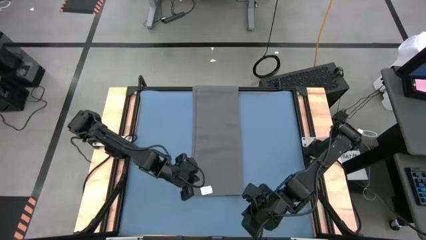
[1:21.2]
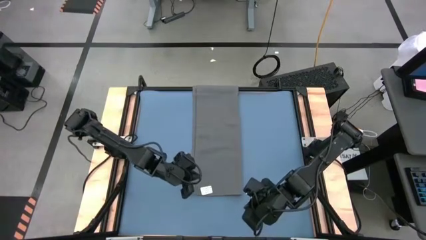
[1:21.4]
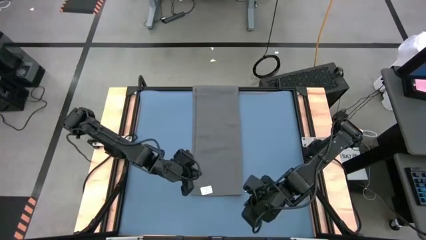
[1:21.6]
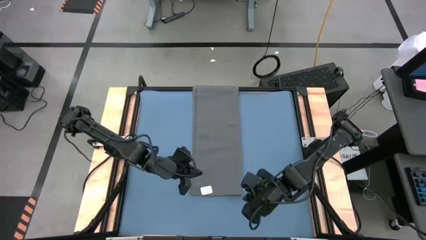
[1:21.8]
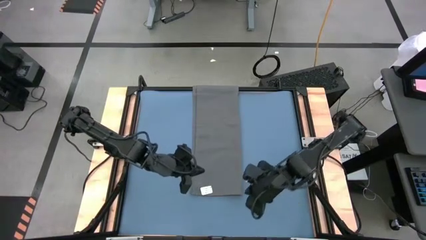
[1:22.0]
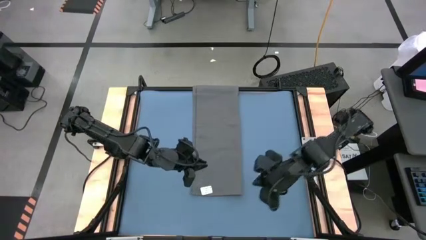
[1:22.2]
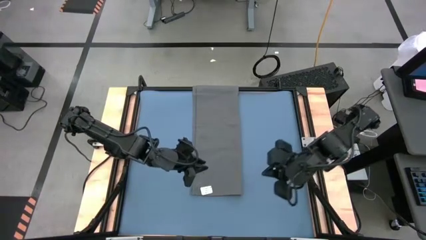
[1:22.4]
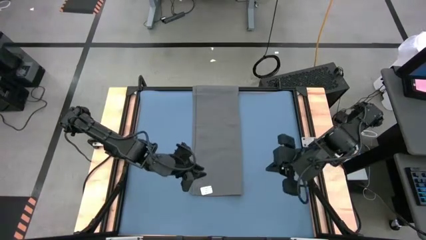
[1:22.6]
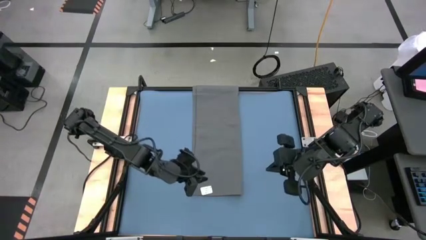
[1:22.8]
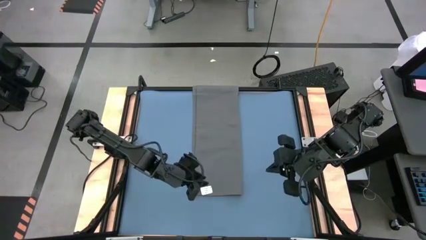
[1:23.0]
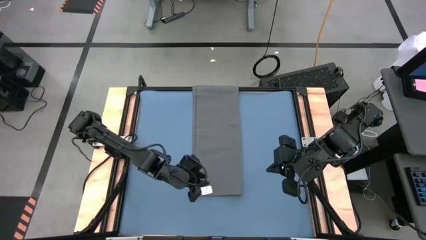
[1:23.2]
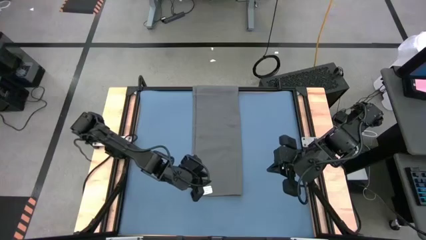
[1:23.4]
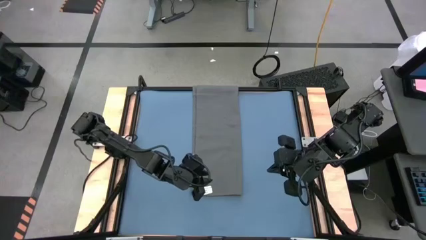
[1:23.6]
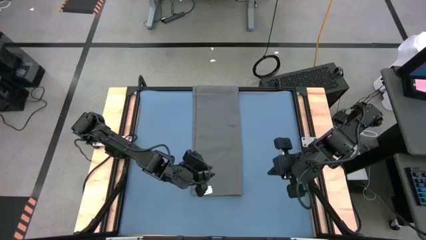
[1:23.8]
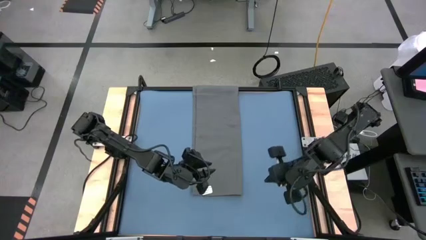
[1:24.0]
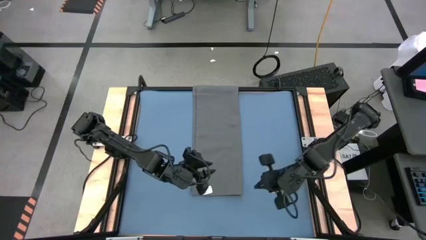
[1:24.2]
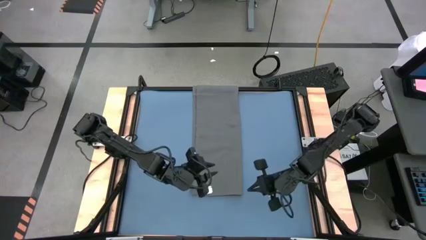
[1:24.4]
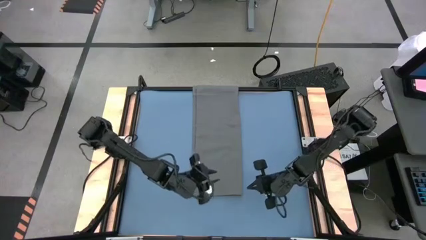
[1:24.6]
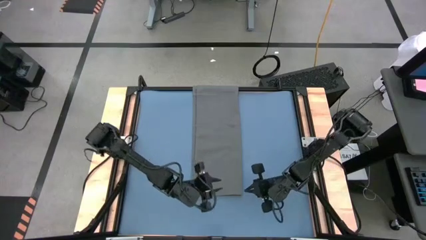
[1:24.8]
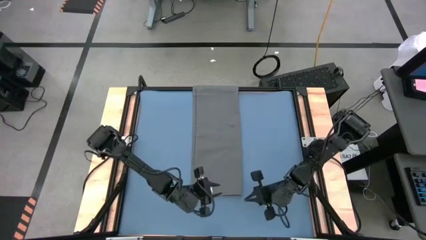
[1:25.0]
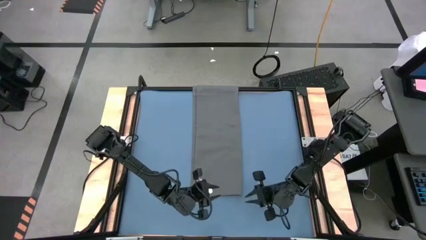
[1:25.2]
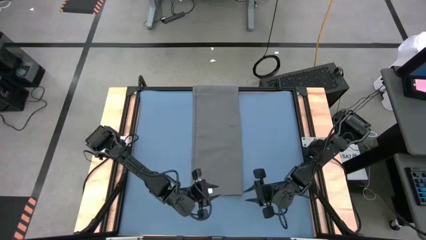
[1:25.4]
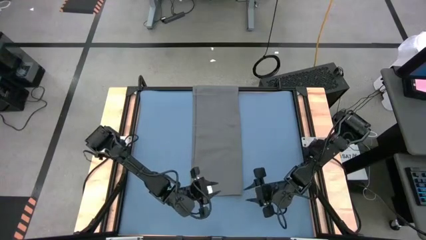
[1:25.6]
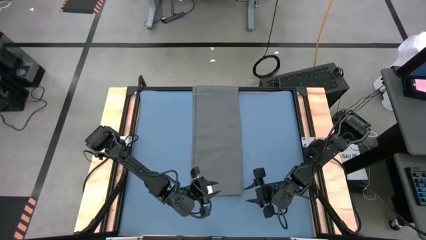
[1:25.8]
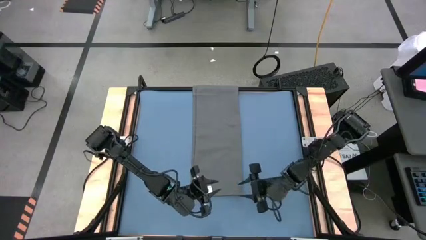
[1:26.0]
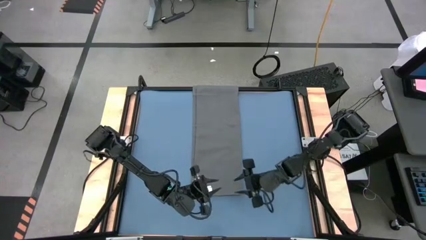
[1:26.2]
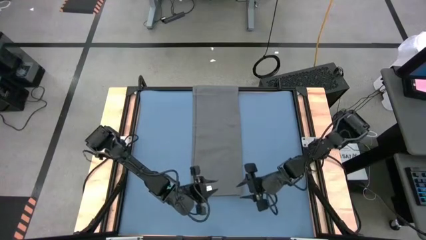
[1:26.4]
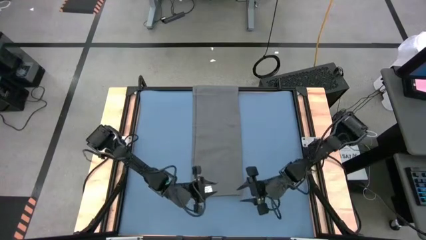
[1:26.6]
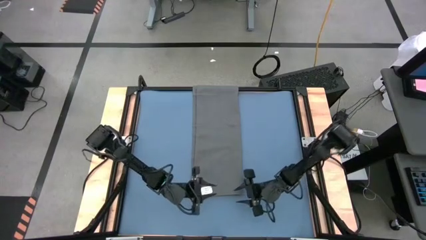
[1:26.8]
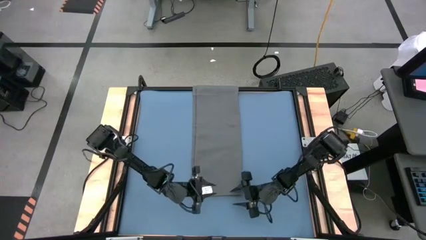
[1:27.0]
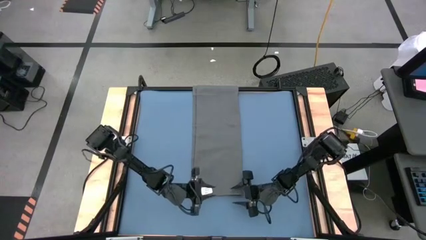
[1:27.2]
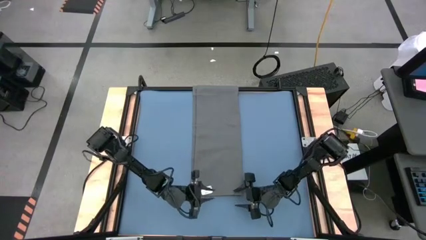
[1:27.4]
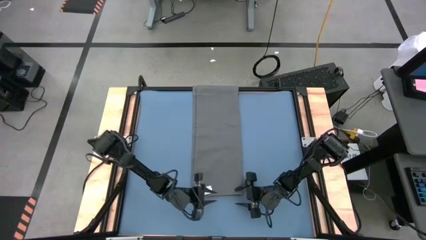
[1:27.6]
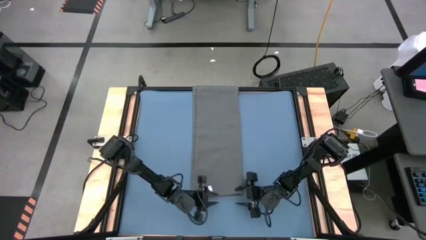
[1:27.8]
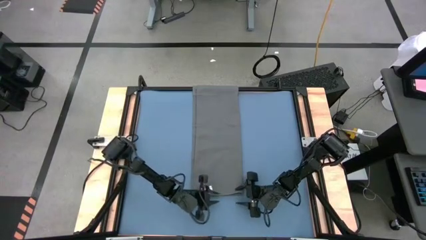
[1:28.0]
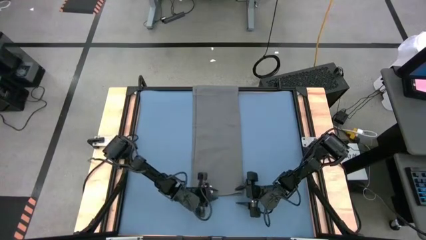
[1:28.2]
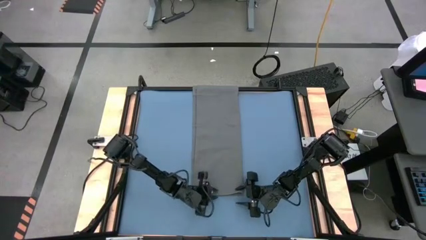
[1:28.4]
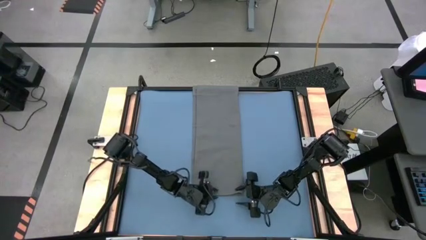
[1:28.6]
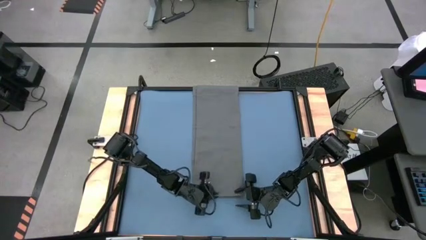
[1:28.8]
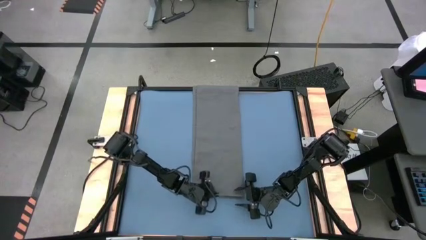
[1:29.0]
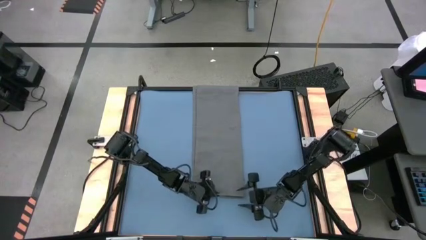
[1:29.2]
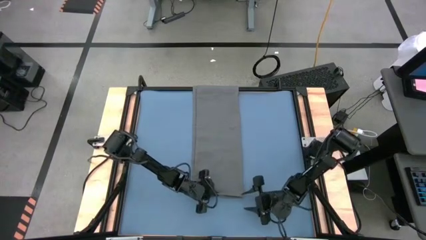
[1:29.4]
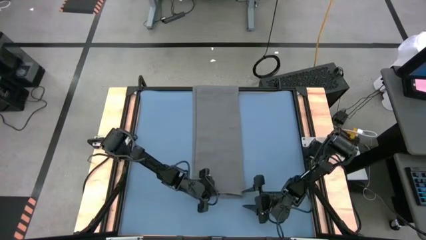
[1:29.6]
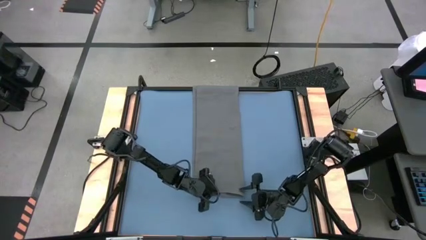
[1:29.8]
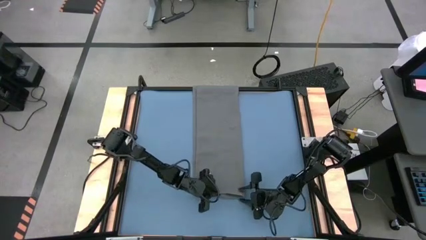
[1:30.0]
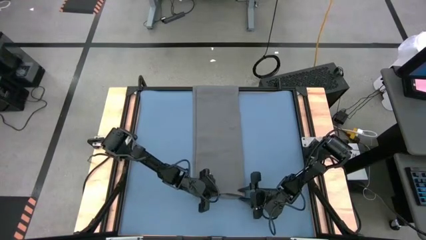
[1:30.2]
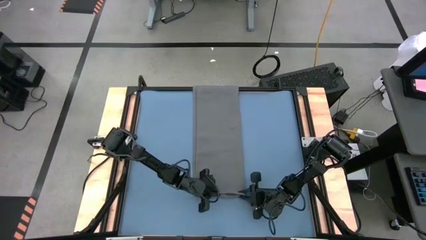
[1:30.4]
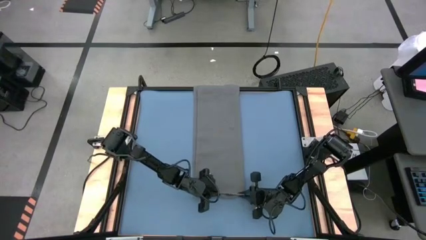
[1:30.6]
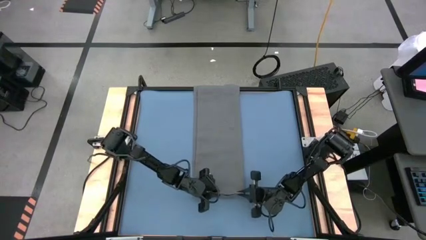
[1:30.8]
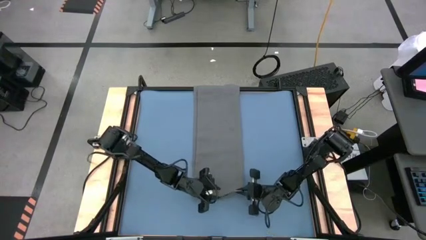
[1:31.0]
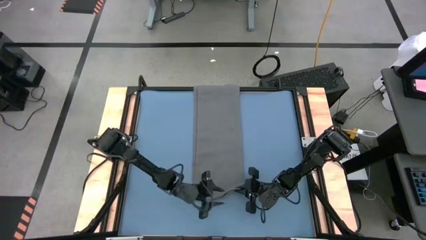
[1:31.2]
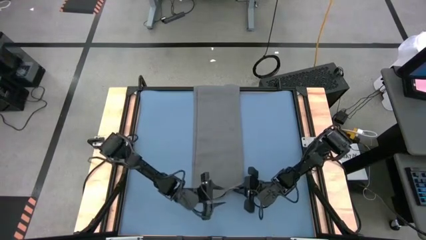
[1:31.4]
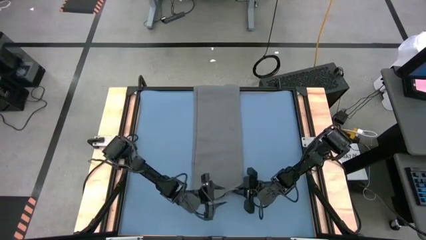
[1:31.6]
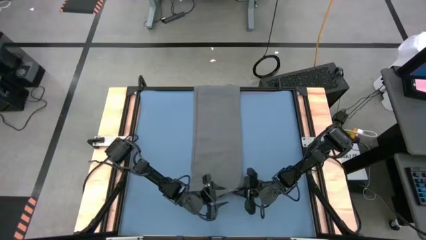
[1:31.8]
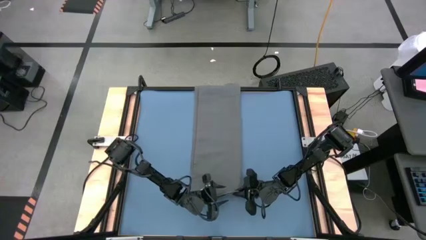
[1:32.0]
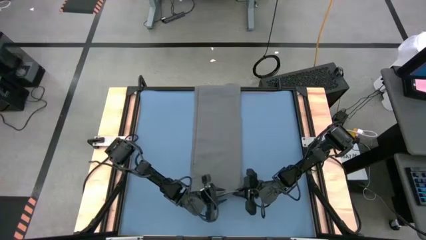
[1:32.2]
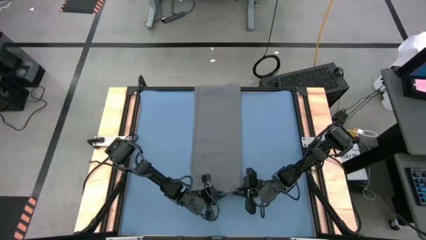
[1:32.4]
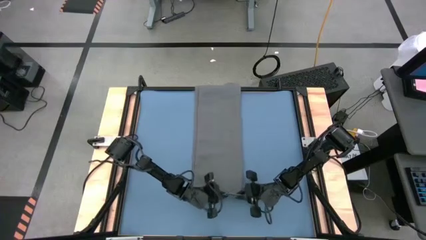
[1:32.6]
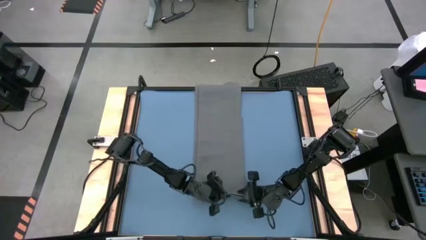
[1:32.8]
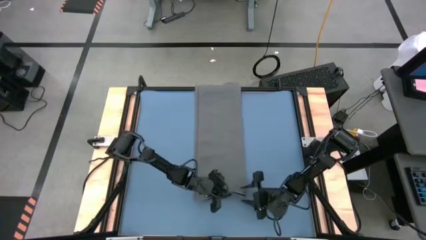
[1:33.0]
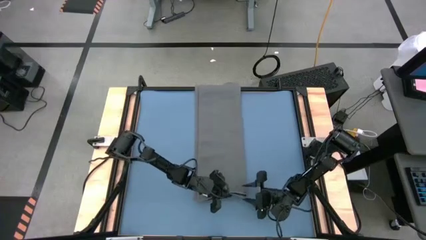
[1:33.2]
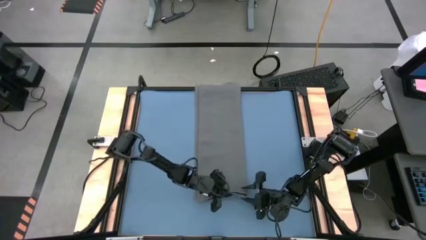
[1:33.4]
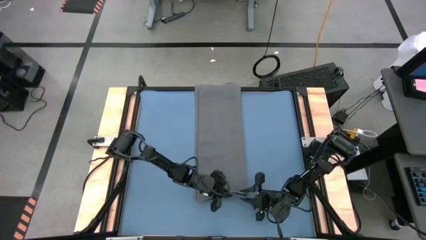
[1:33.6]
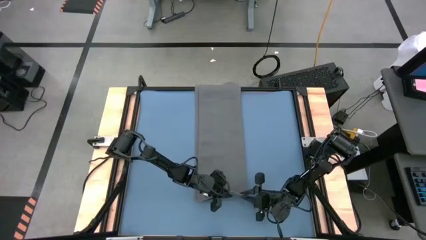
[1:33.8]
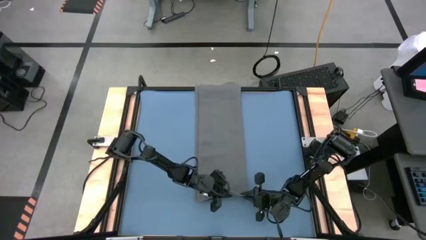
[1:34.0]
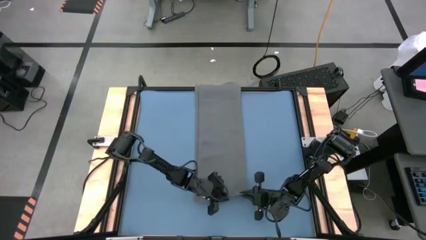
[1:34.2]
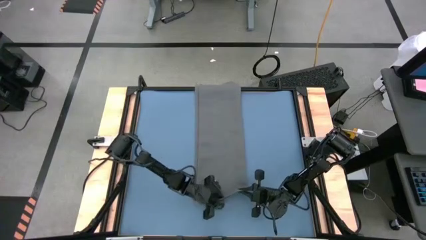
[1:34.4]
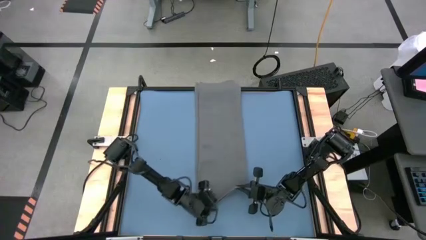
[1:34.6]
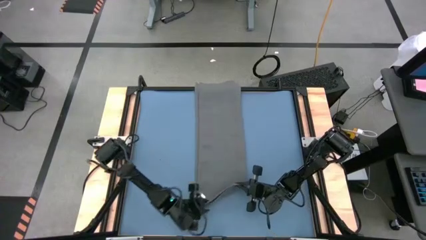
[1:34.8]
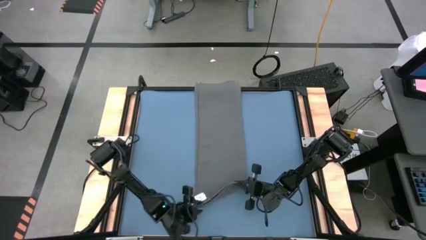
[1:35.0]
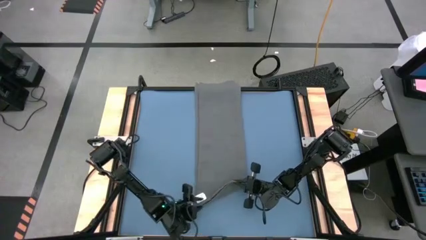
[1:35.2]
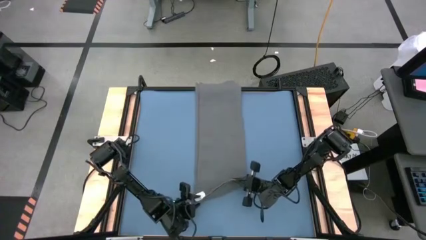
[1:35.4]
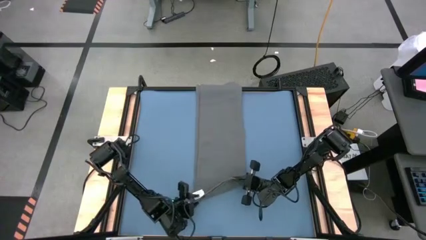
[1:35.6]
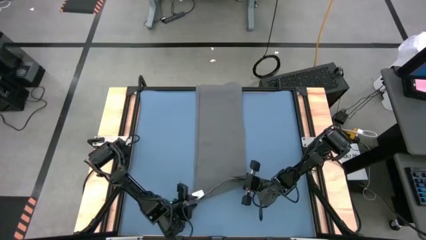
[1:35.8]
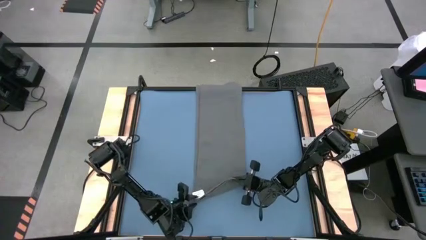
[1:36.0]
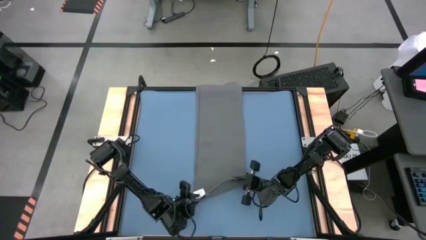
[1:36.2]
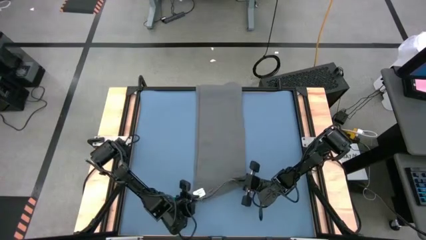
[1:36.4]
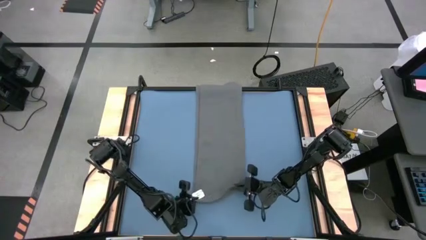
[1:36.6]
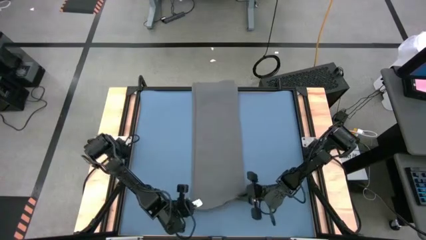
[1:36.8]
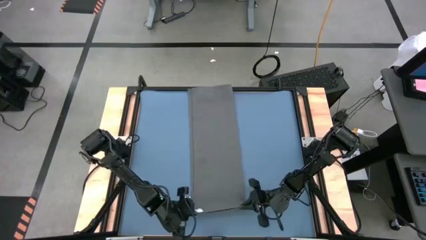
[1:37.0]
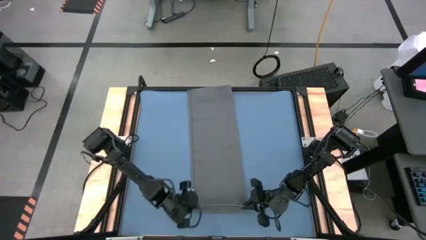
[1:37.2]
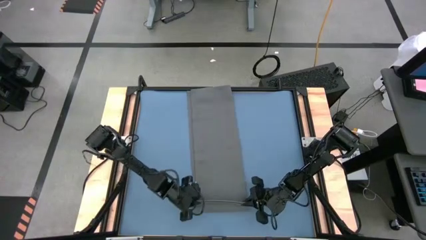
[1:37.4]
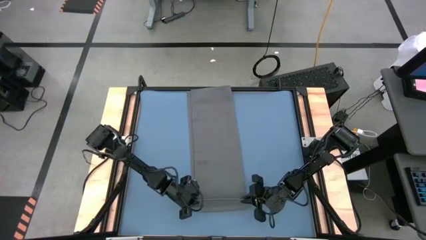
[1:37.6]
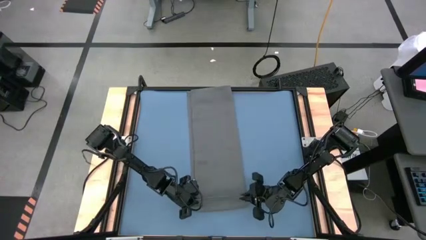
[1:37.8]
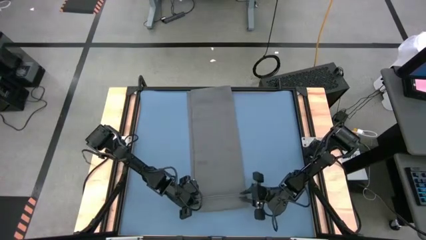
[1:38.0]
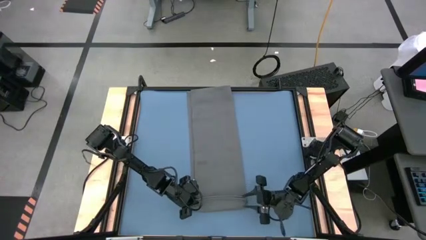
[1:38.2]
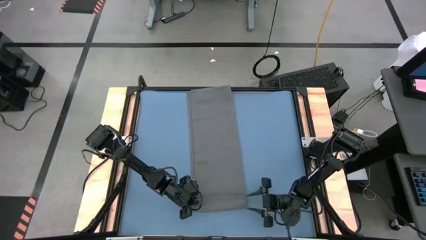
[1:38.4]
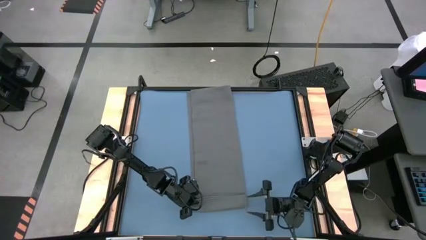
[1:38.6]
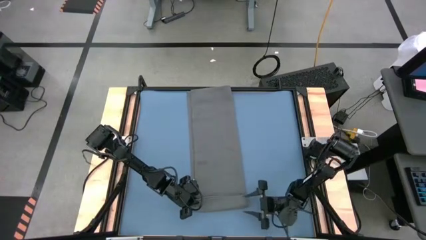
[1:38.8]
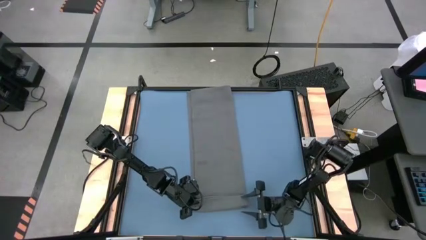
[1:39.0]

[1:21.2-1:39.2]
Task: Roll towel
Roll the gray towel
